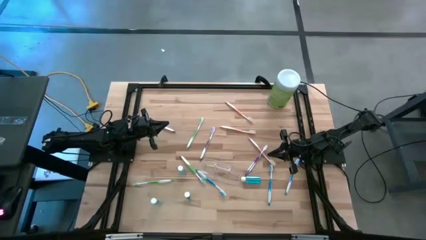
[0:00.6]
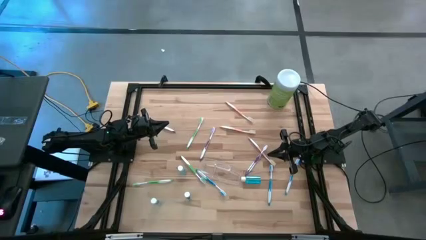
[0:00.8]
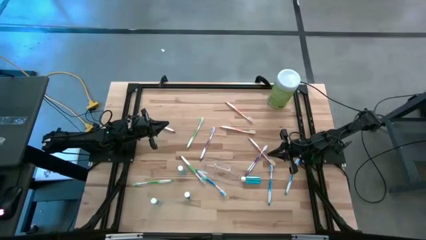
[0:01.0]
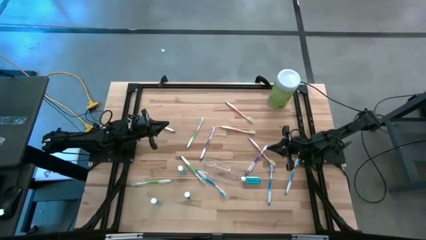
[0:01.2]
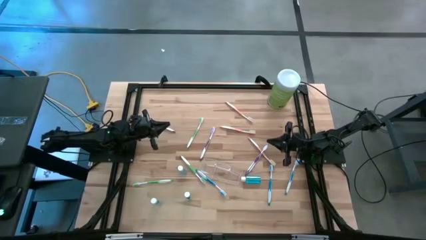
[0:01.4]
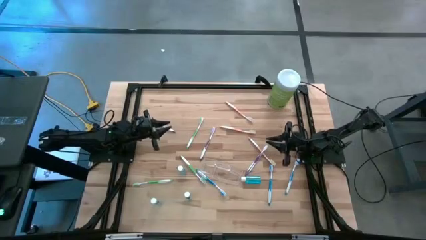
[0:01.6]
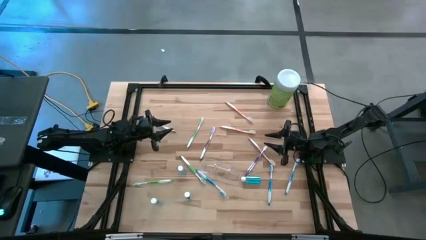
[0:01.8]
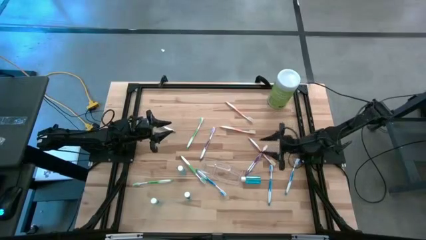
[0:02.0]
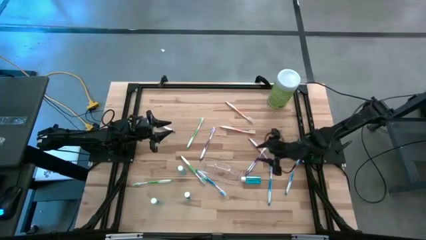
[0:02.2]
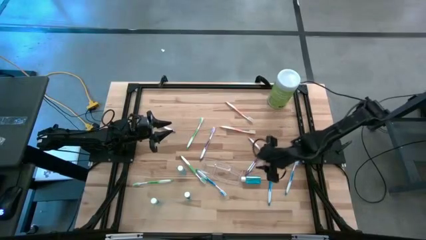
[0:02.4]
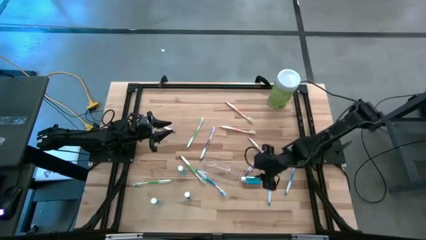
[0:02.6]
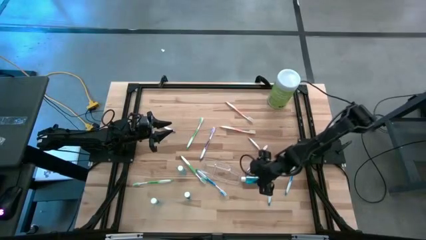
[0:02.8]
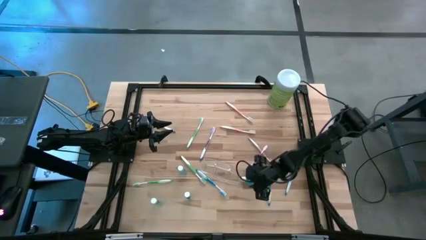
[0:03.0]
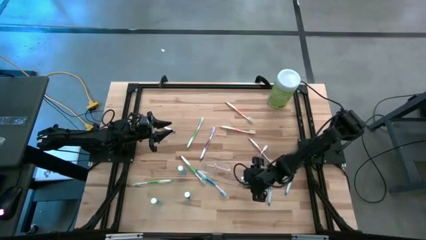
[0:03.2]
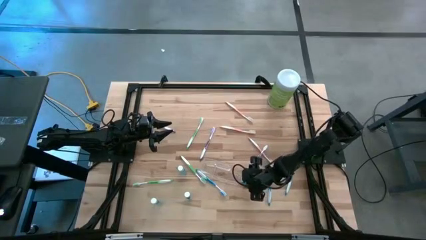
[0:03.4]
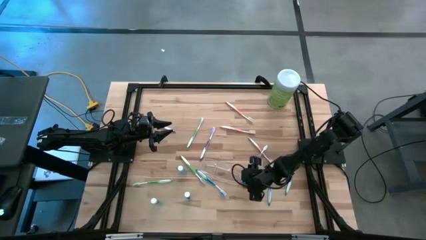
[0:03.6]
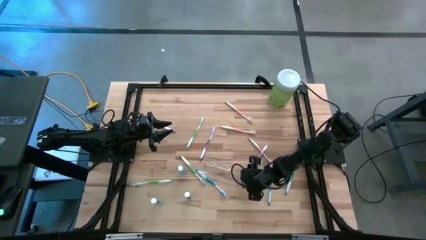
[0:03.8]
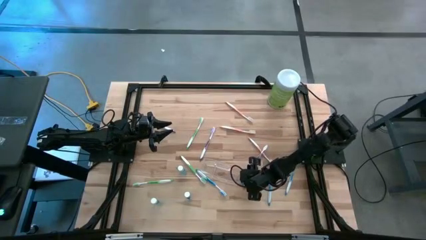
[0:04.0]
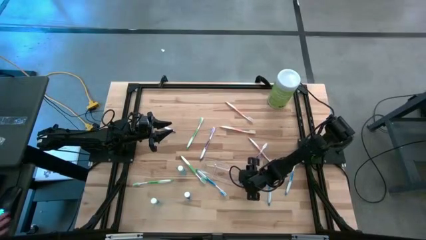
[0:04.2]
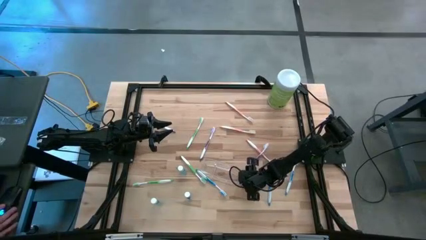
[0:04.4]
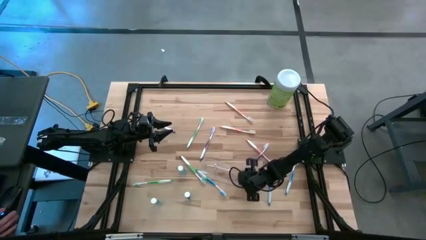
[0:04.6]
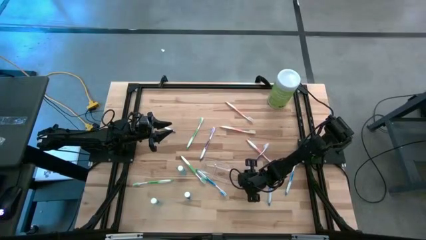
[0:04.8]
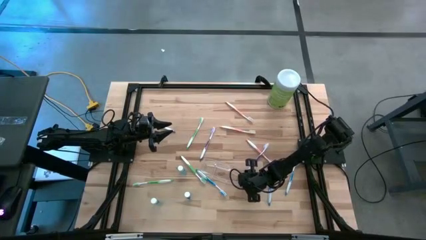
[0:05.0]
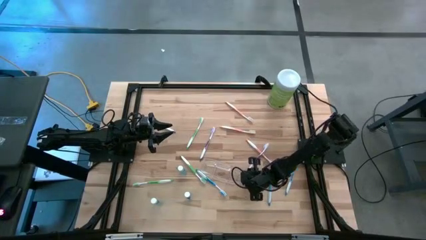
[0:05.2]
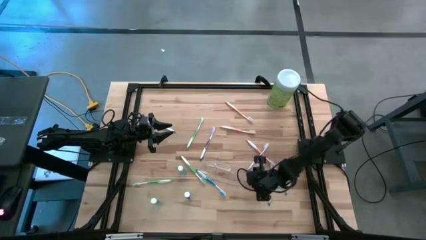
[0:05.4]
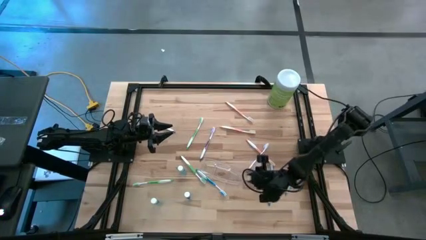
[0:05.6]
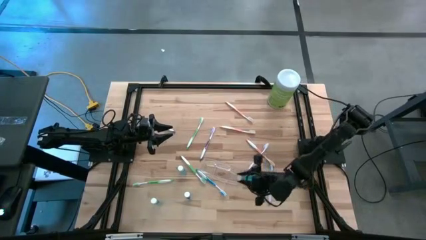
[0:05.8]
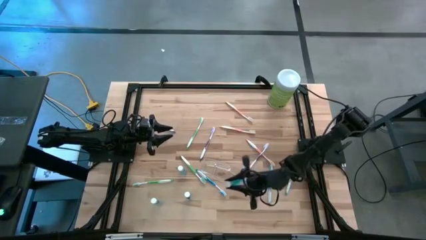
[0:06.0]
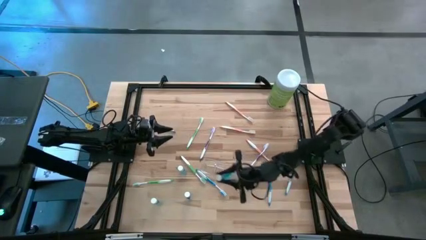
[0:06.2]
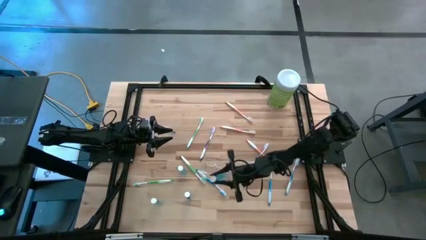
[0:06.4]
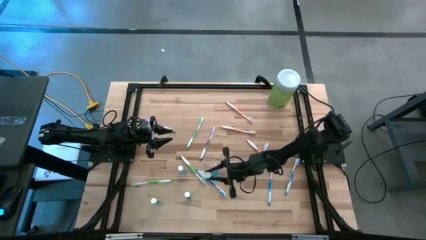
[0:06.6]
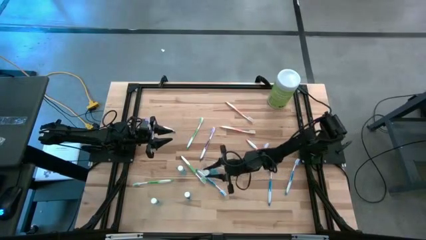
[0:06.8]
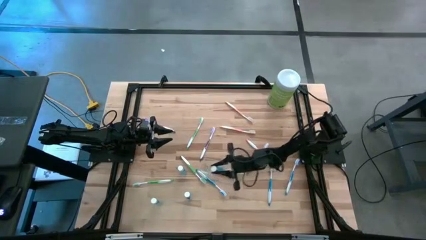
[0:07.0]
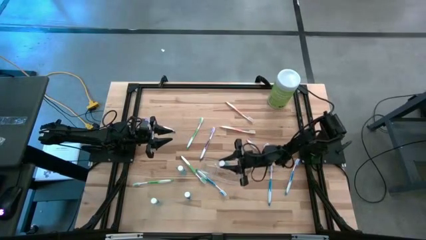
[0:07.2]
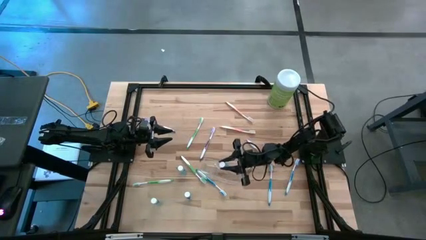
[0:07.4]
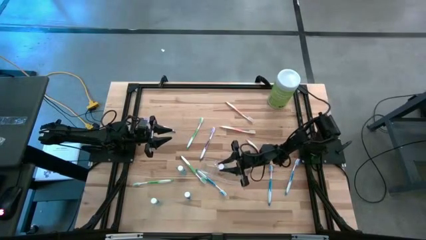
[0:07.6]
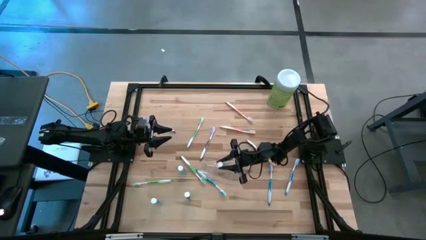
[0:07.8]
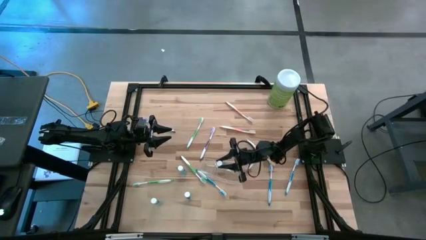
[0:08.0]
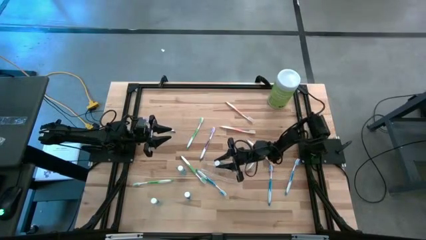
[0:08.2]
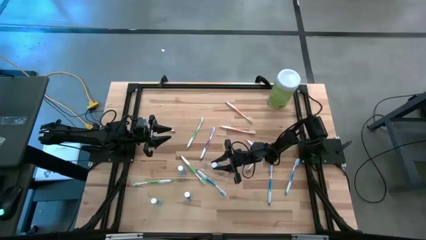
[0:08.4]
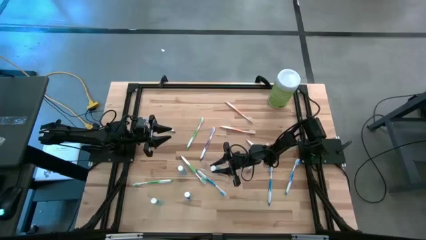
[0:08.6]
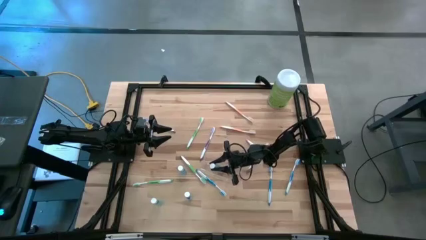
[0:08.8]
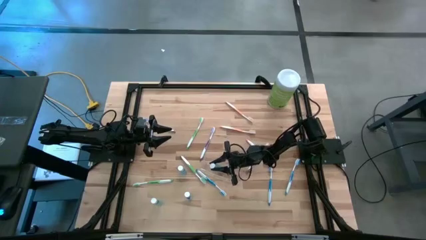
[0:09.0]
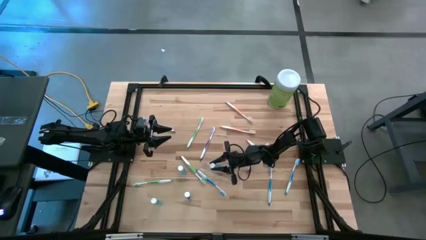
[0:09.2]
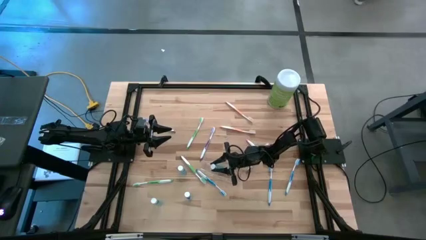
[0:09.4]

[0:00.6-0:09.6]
Task: Pick & Place toothbrushing station
Put the blue mouthwash into the transparent organizer

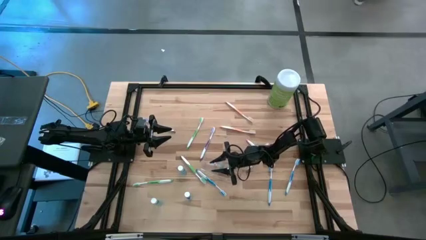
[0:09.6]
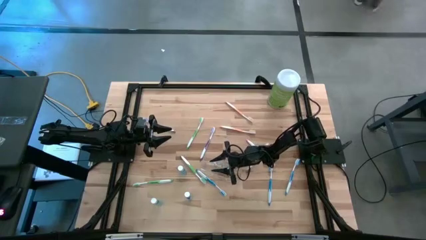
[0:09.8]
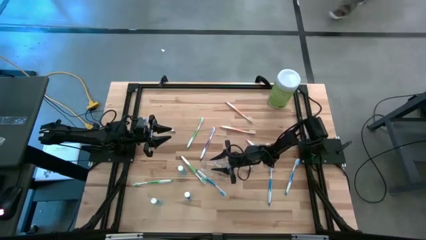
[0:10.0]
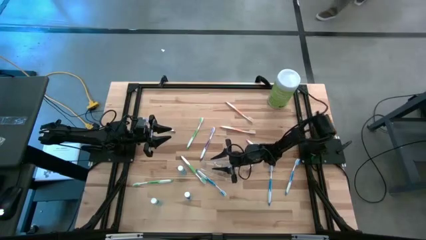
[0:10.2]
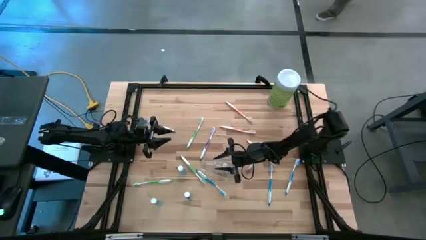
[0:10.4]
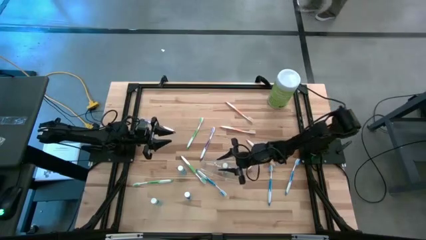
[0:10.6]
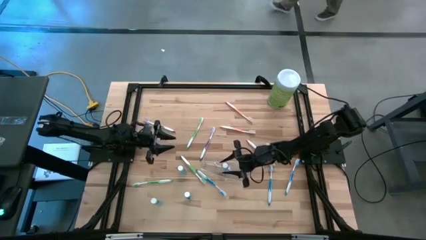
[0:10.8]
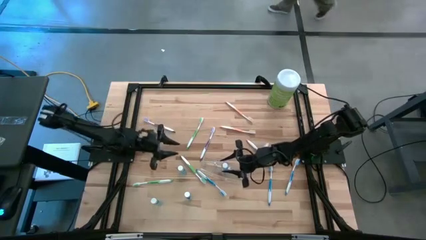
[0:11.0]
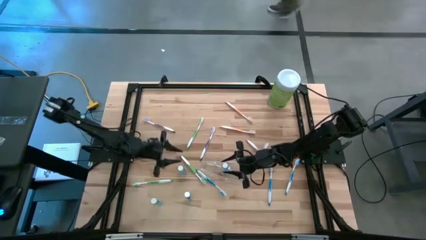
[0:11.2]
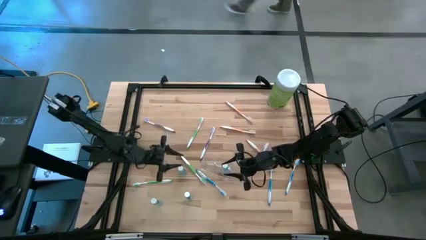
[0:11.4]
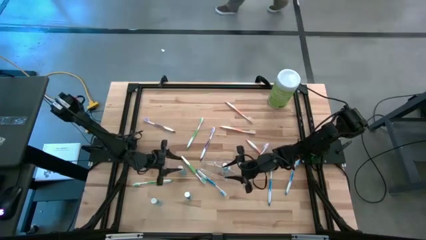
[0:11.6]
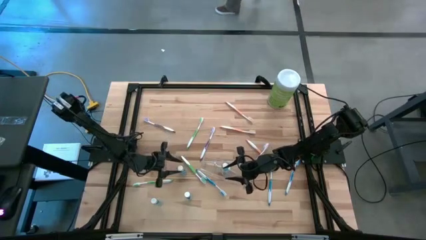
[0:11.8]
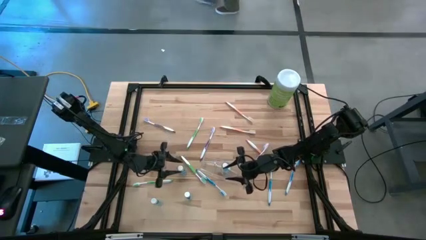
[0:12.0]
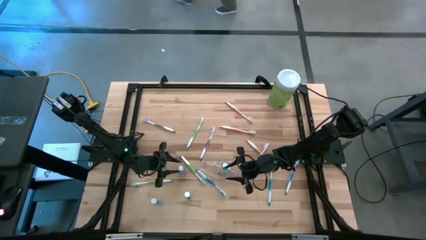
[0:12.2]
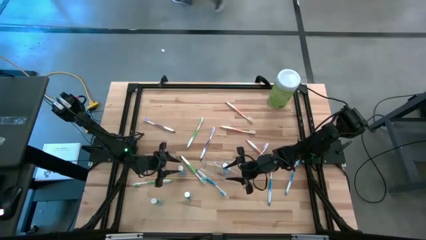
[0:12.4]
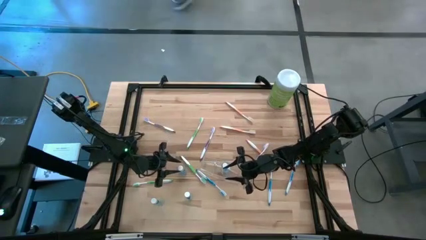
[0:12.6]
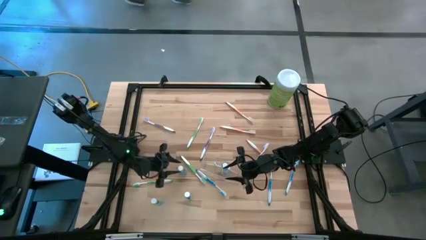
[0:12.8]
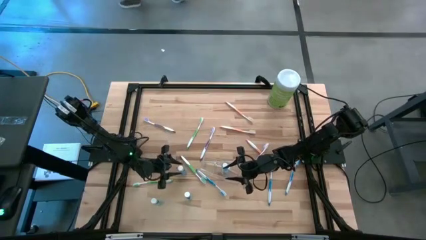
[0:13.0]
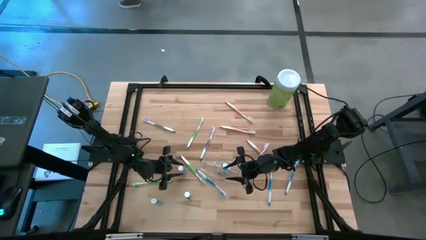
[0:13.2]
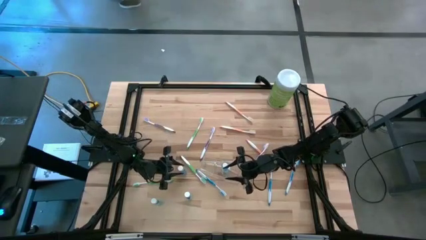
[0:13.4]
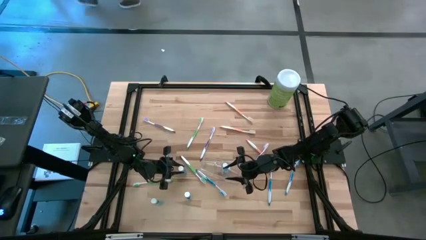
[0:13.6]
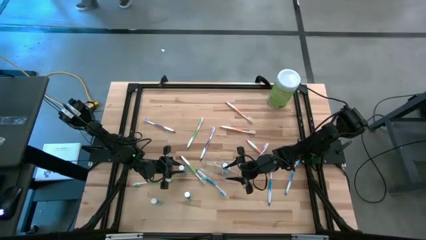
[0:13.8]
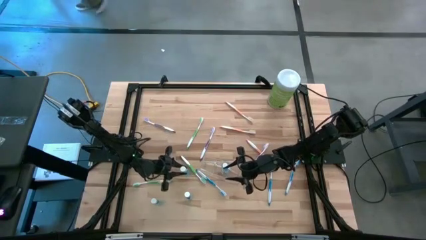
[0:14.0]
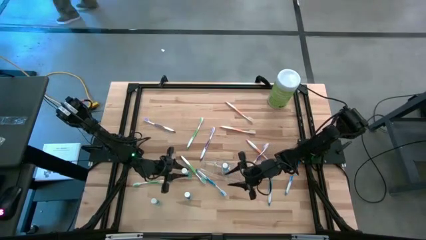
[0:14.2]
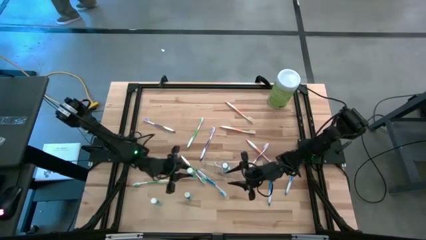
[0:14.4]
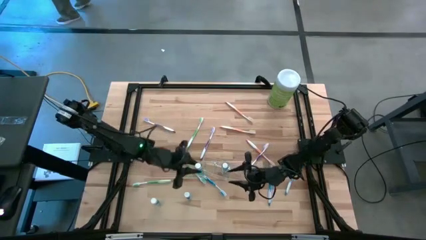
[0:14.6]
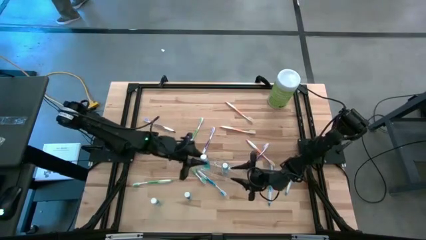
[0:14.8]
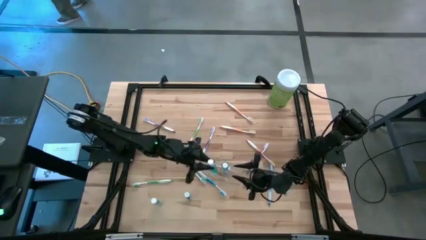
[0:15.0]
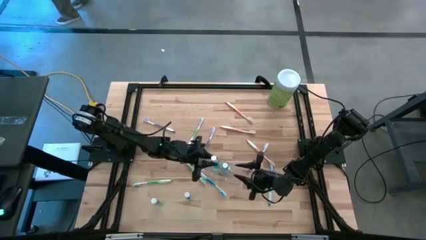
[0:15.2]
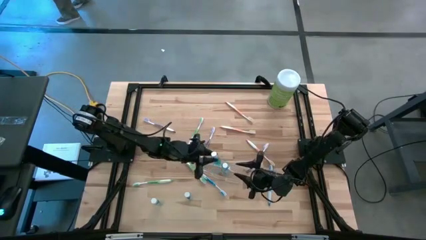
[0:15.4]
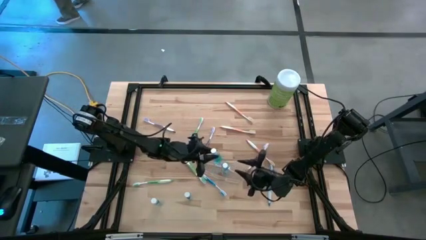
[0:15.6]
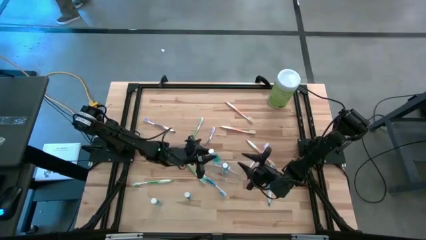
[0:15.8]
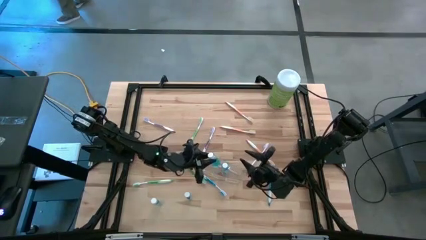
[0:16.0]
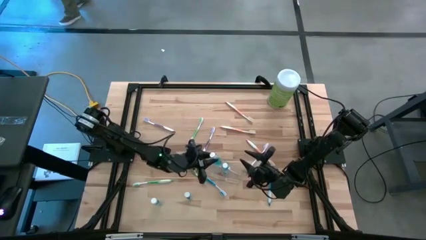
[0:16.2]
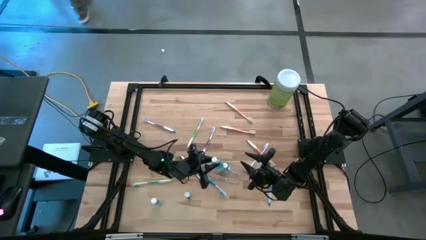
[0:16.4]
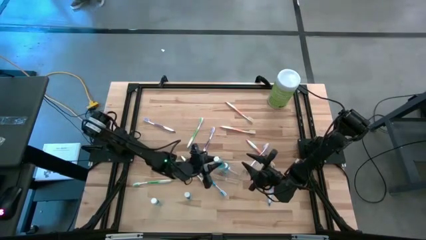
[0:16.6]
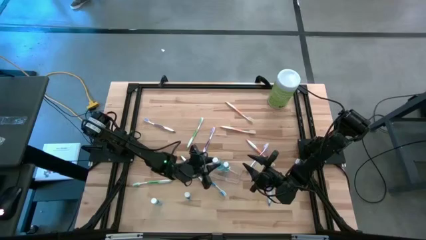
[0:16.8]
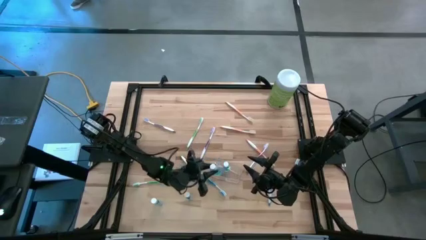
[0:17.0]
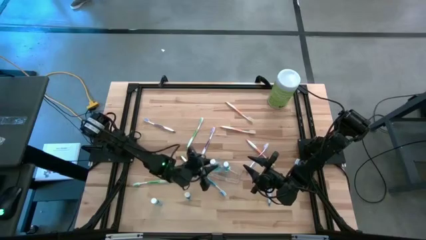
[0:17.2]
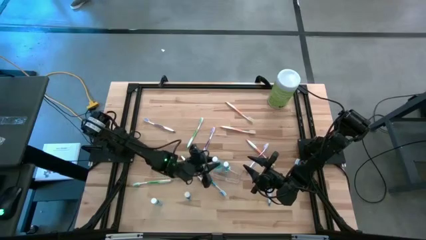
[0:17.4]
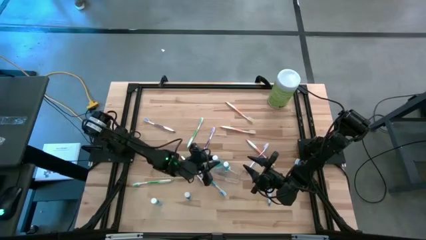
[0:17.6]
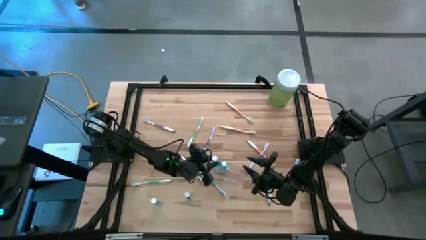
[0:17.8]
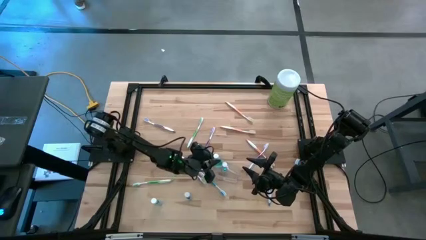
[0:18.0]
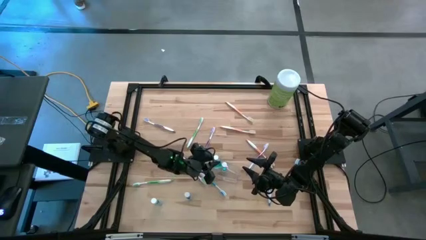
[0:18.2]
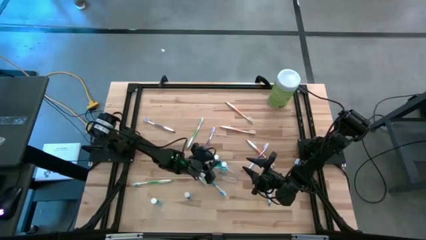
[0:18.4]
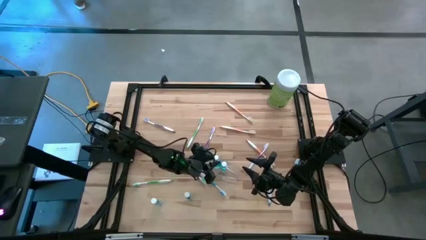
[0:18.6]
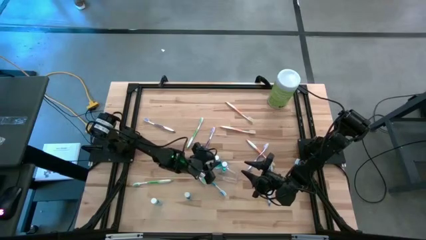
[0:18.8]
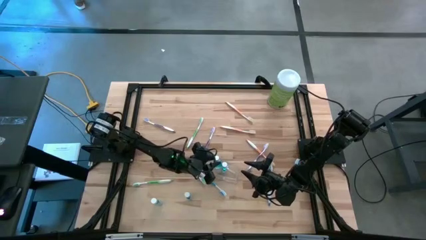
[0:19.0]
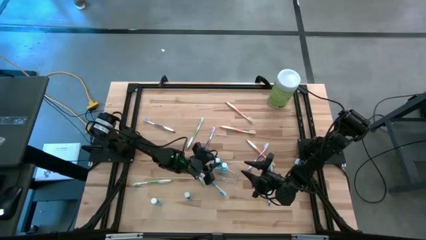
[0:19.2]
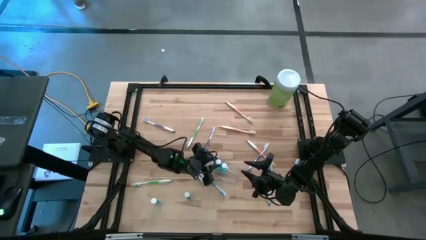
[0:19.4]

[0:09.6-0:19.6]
Put the blue mouthwash into the transparent organizer
